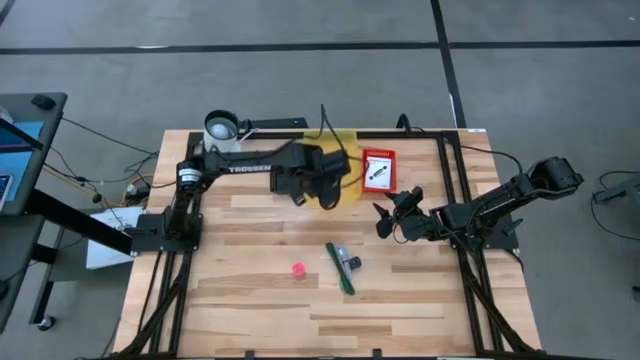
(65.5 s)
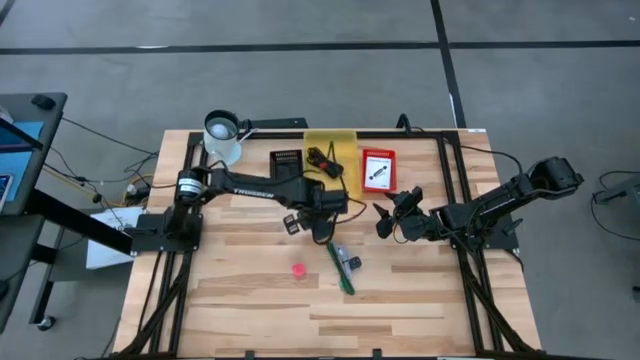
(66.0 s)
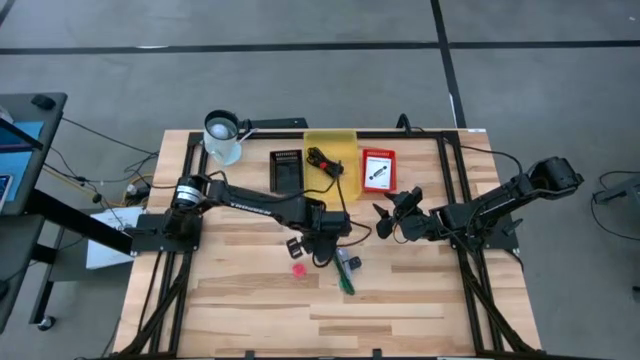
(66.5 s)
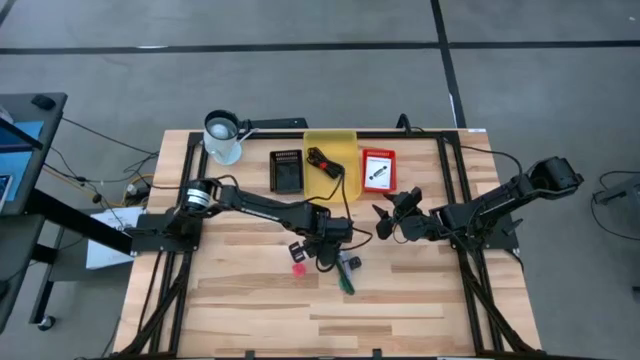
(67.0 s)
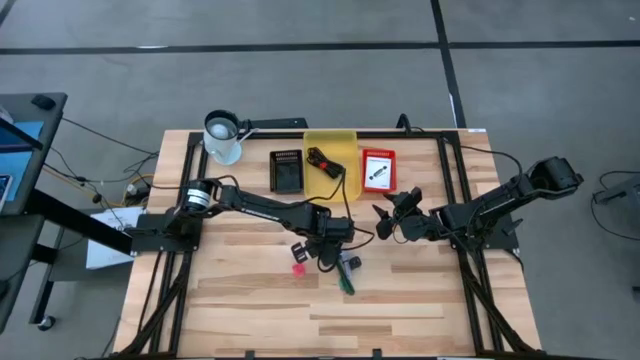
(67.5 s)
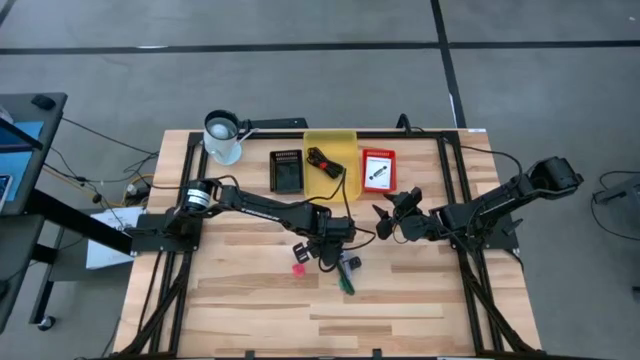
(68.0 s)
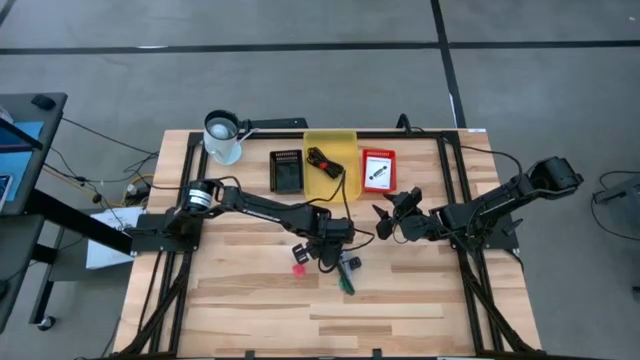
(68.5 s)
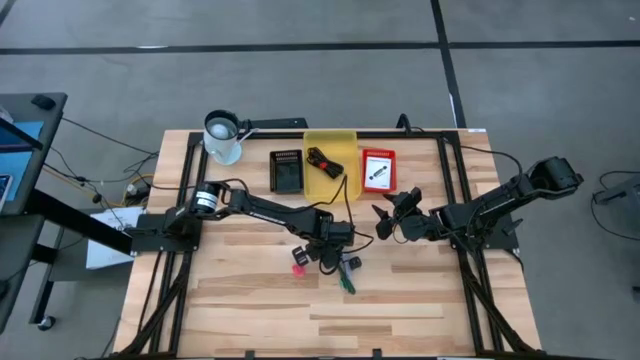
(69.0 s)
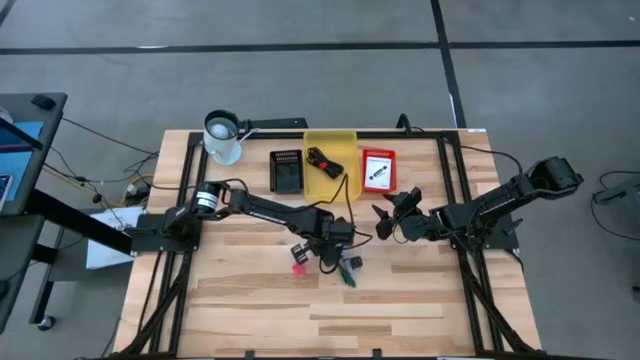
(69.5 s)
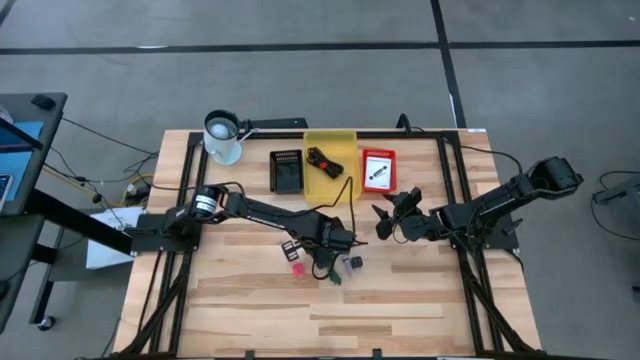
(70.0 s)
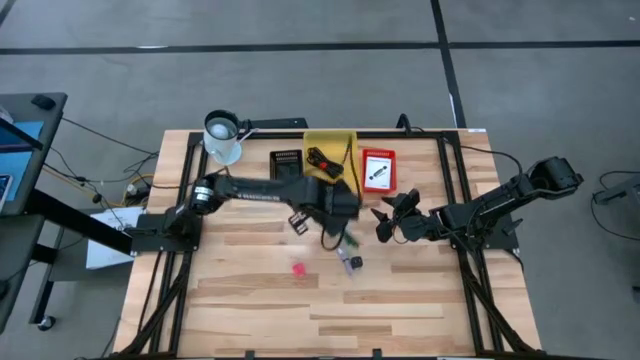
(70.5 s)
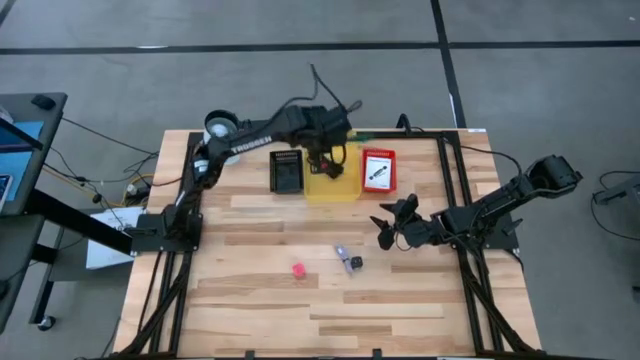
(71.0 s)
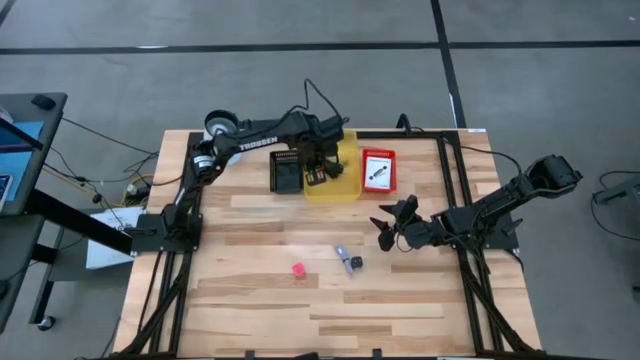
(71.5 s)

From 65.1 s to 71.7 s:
Task: Pick and place items into bin
Put the green charger cable into the yellow bin

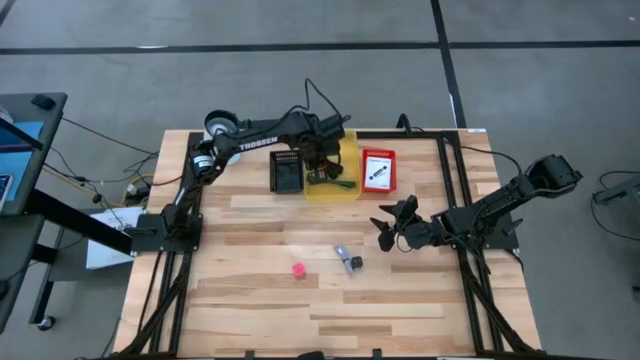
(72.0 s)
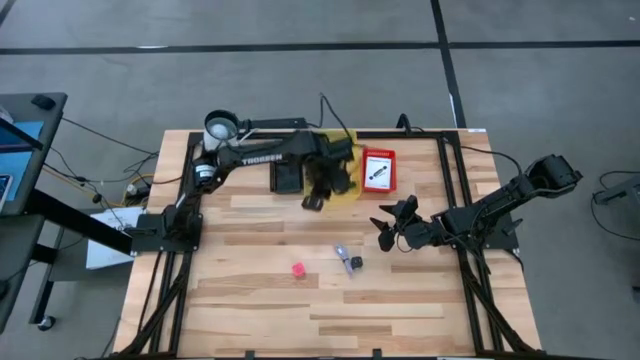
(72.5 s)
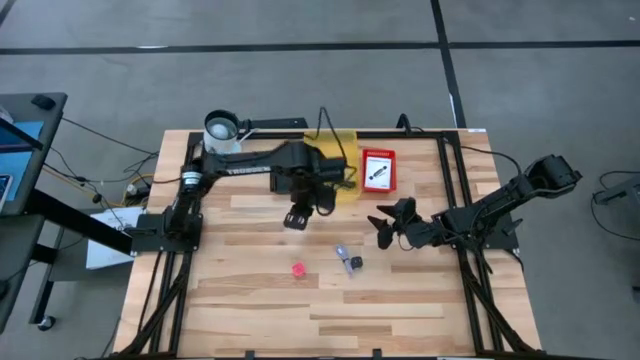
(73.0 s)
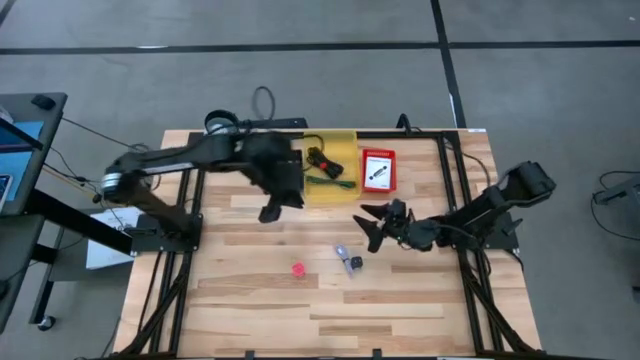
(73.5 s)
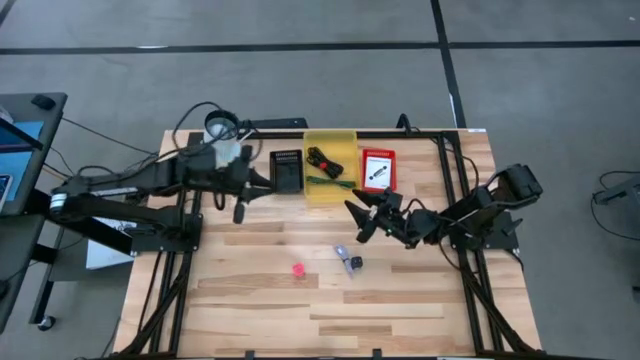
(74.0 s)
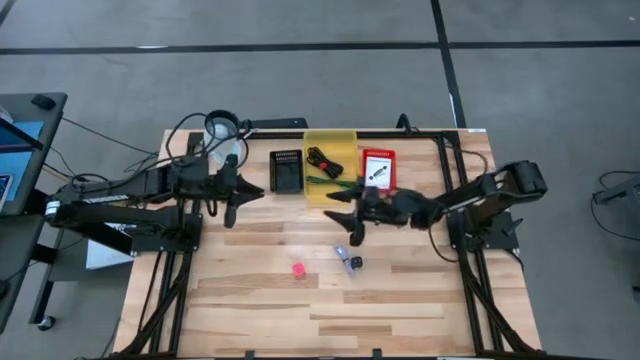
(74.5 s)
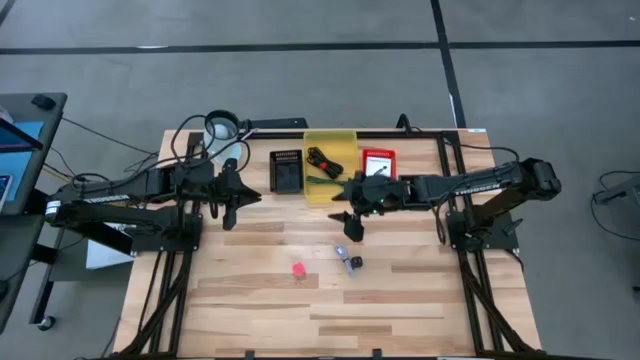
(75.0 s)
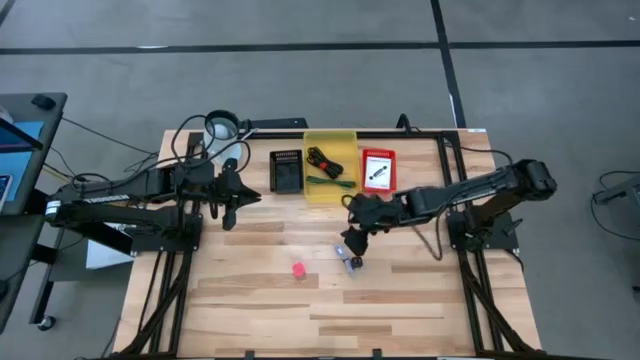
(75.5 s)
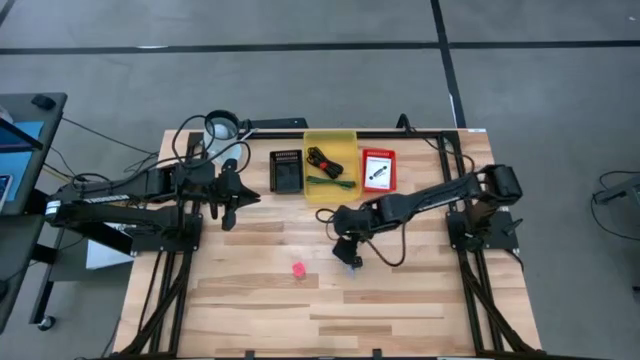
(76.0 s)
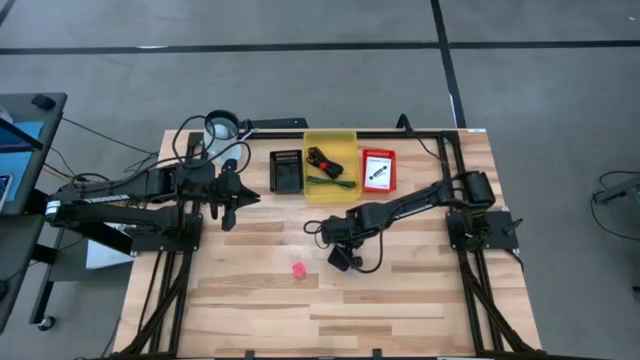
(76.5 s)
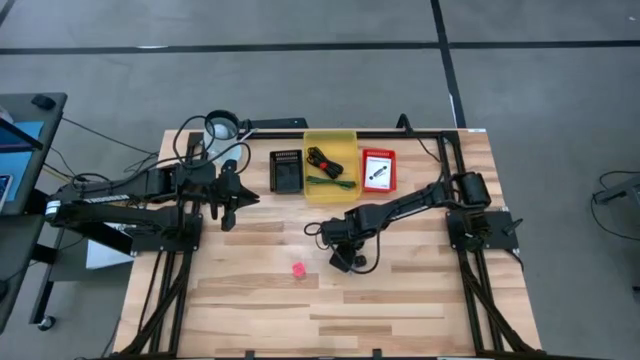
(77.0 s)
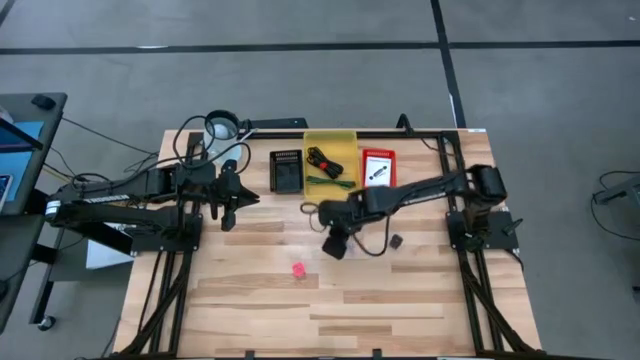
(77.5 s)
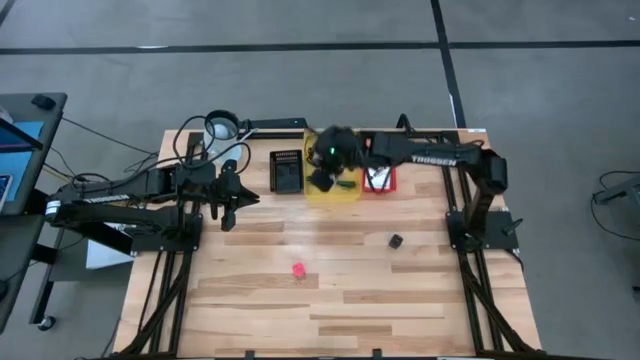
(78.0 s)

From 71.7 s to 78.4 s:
Put the light blue charger cable into the yellow bin

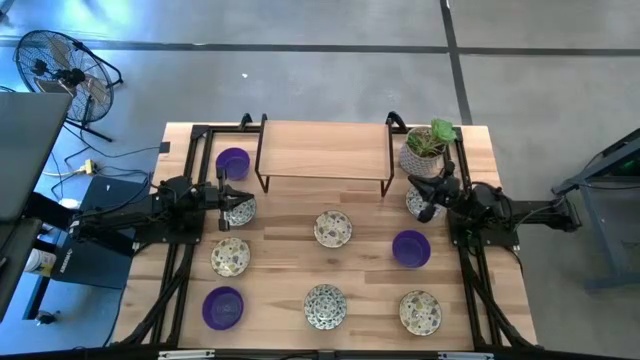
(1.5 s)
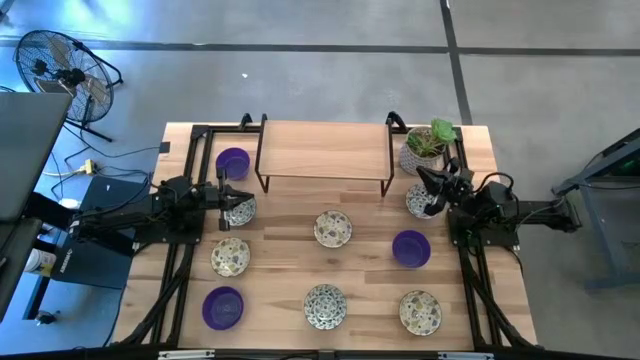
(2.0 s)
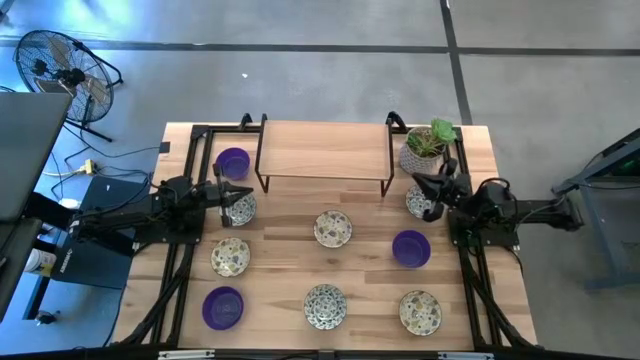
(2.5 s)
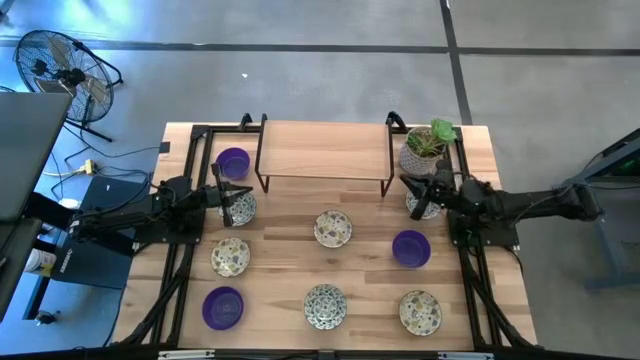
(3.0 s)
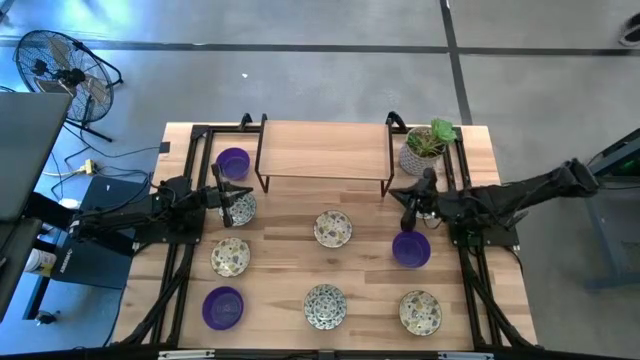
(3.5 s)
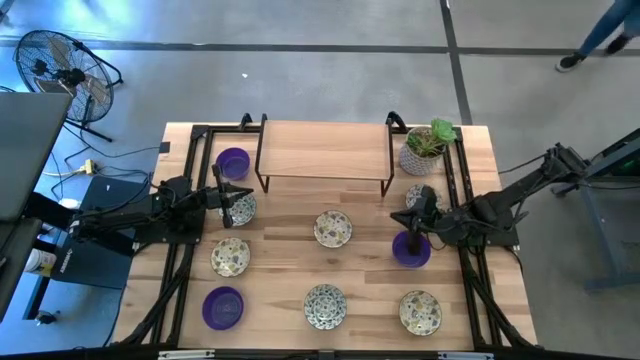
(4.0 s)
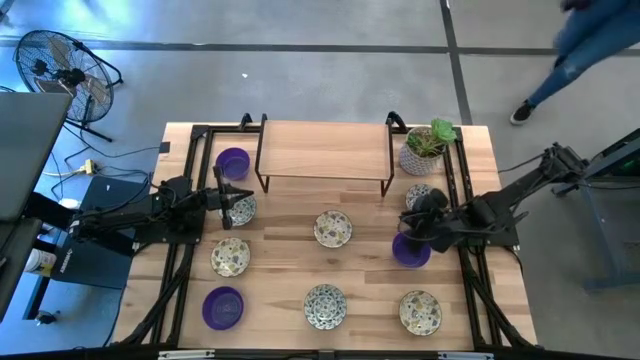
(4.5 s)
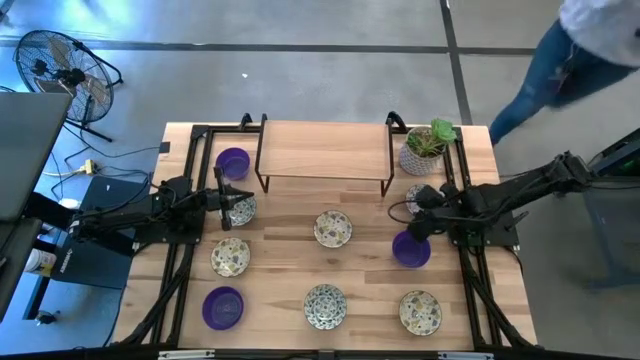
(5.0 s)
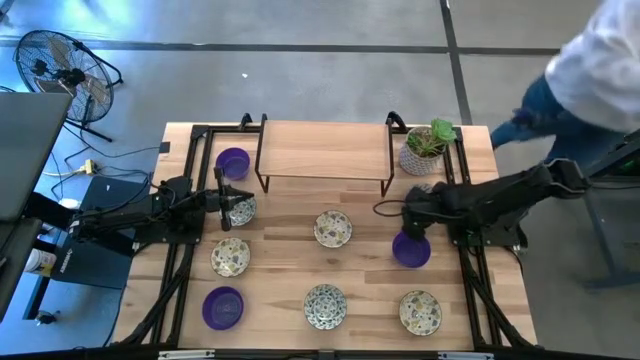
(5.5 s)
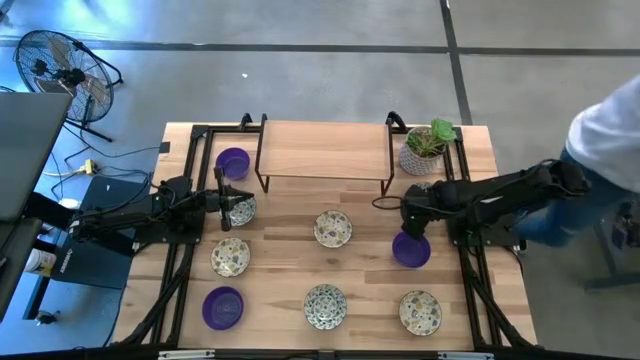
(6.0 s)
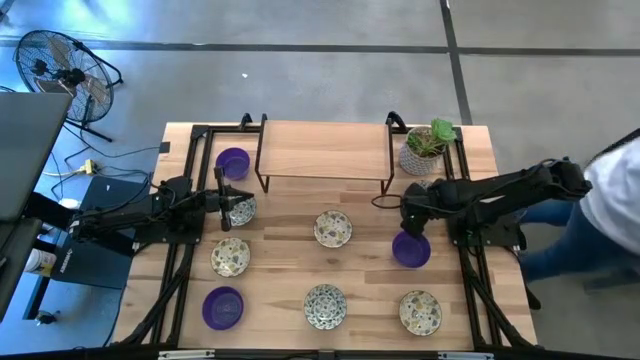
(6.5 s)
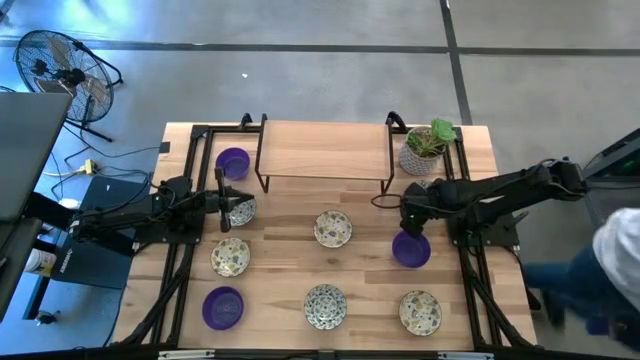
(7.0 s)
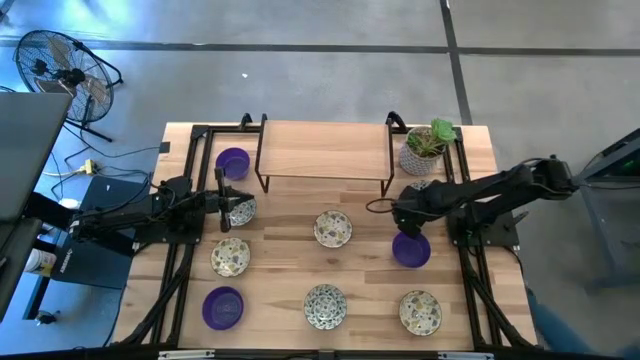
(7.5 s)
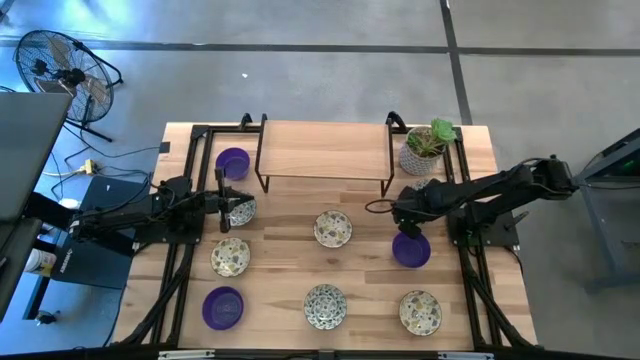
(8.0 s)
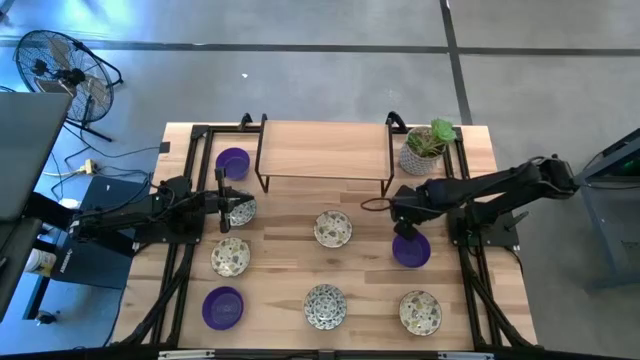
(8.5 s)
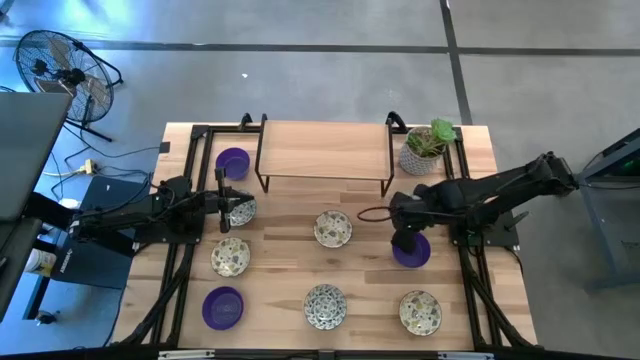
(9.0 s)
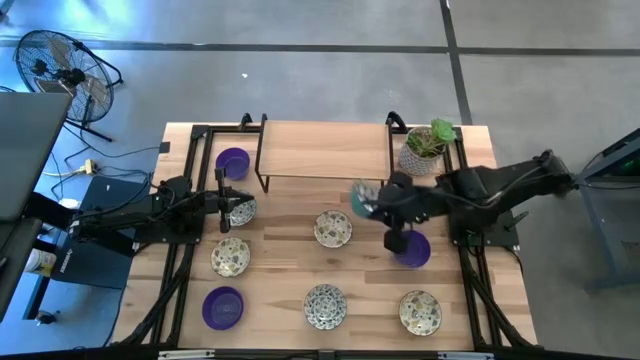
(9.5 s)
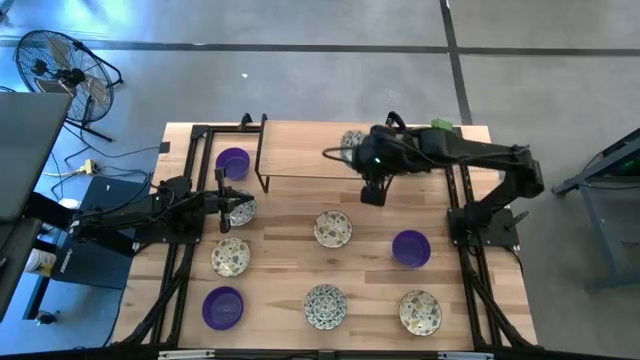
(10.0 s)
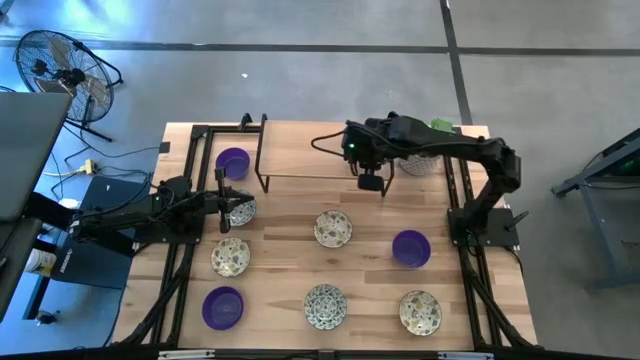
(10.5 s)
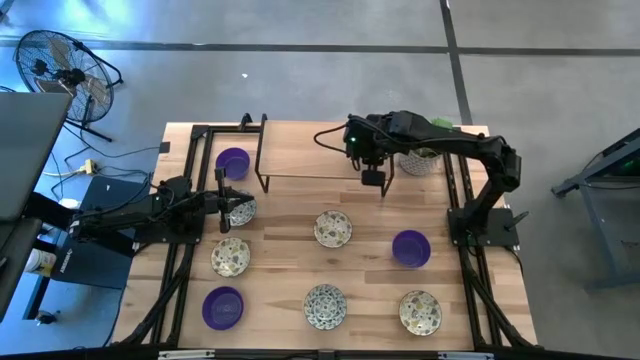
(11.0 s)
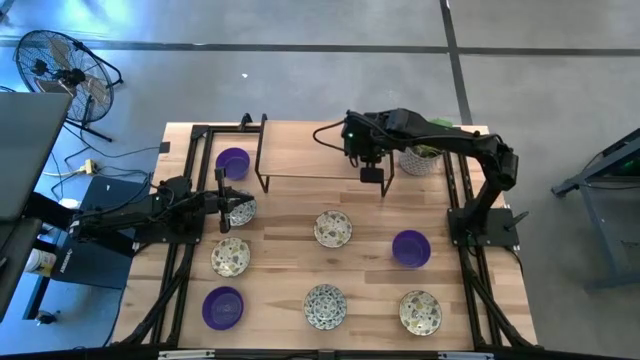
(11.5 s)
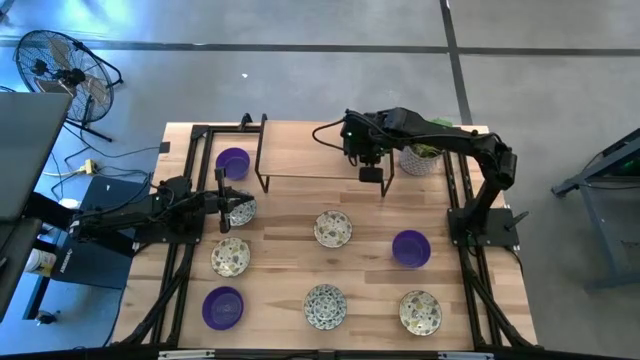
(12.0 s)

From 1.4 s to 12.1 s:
Task: Pick & Place Mini bowls
Put the top right blue bowl on the shelf
